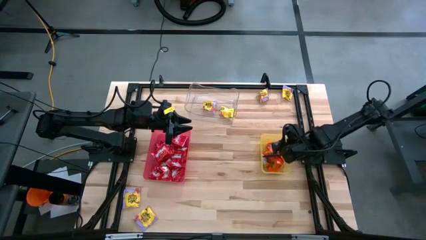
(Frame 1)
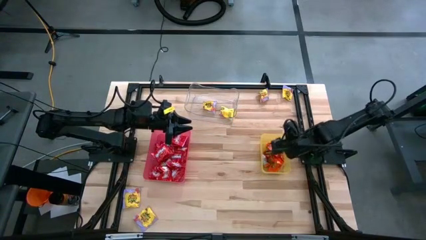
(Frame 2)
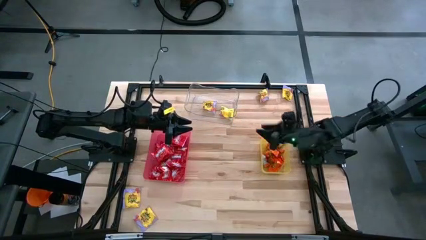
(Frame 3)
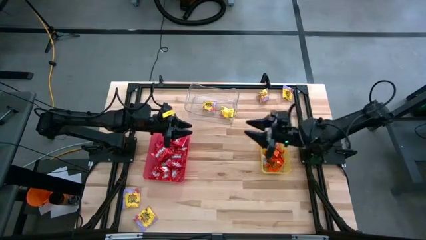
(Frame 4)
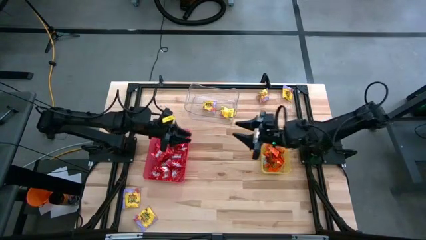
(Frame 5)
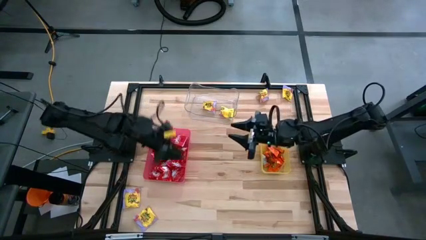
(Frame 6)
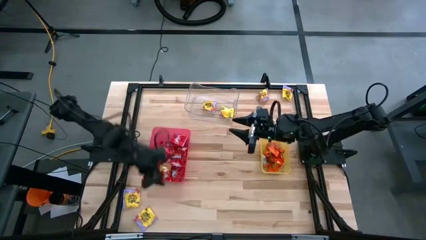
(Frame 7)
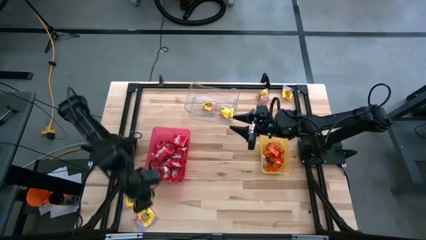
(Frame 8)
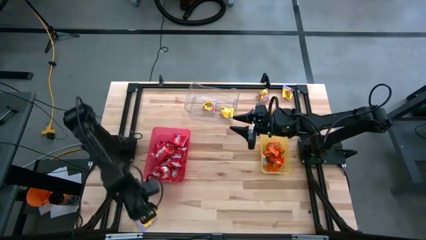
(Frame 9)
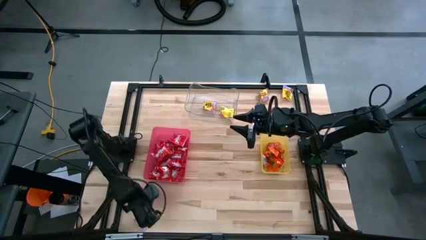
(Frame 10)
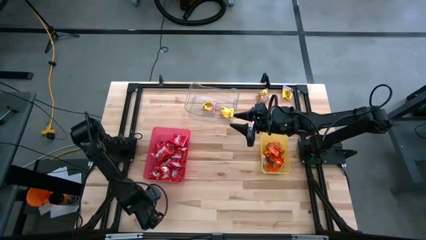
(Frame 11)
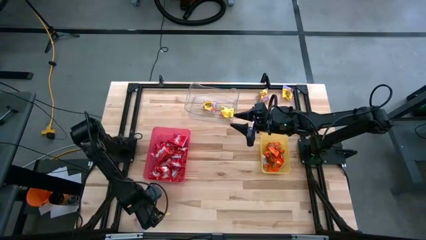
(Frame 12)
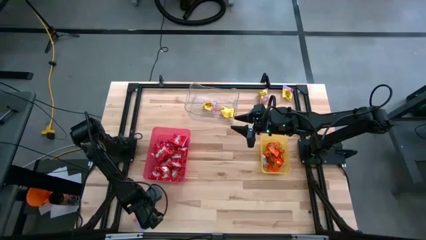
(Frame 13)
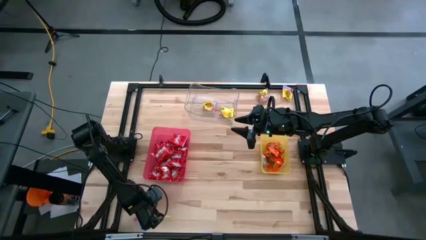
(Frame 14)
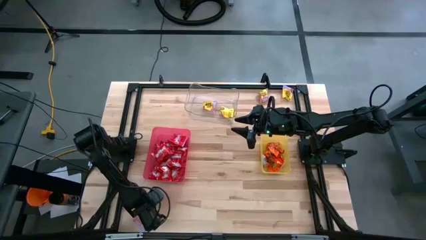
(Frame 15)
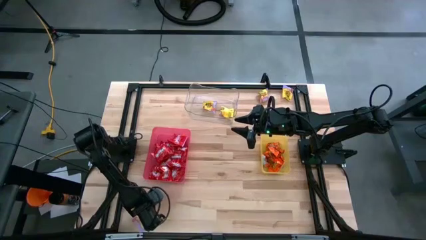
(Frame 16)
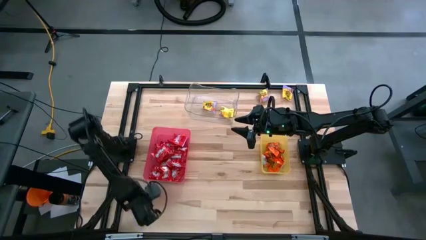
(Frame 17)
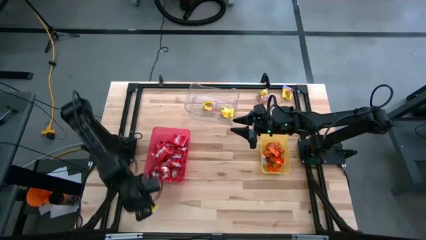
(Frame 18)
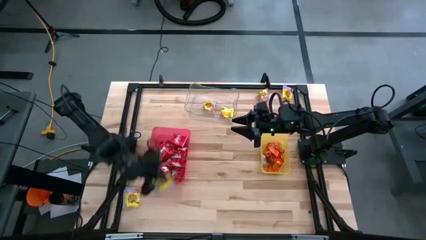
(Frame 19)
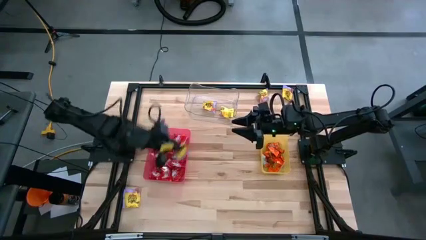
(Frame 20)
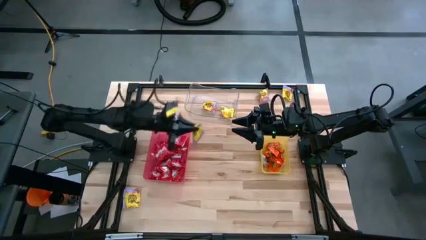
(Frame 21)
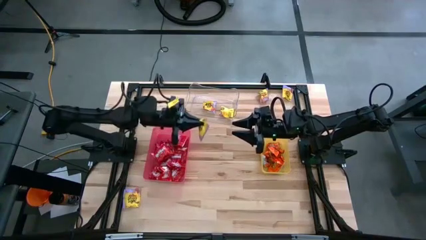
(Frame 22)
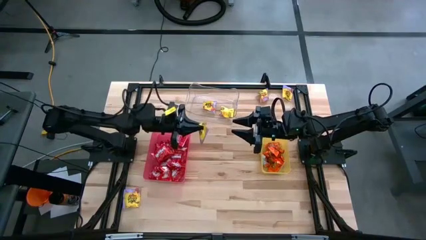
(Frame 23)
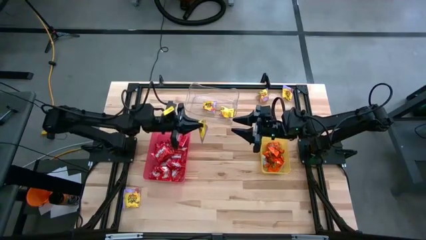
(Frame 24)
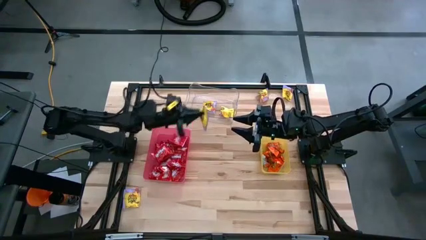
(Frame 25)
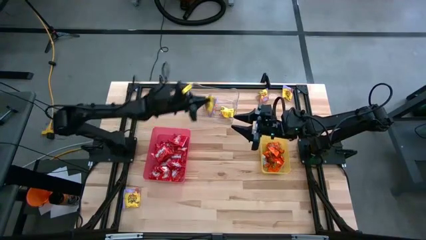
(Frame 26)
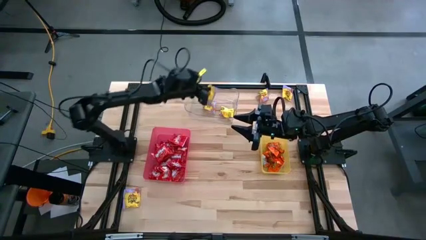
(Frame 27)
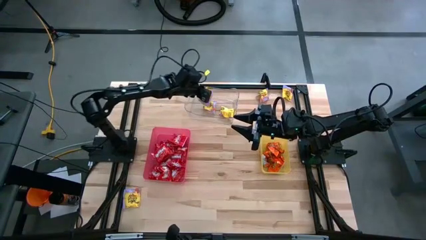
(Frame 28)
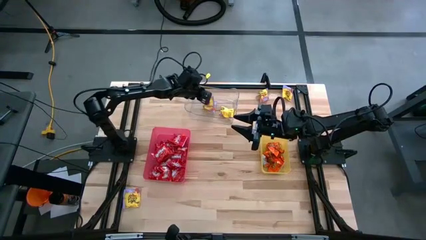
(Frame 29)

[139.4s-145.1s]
Task: Sort candy
Put the yellow candy into the transparent bin

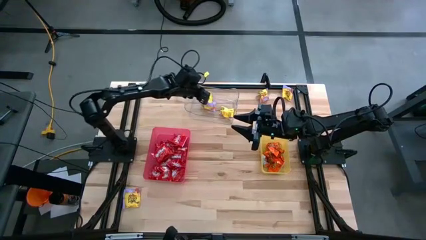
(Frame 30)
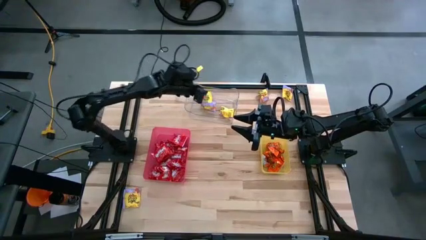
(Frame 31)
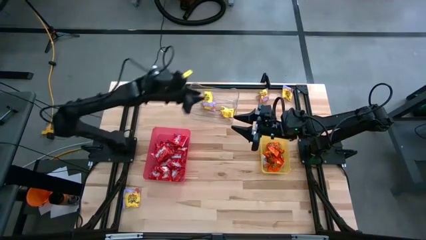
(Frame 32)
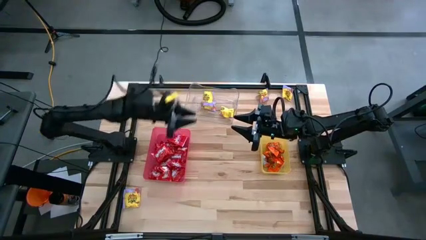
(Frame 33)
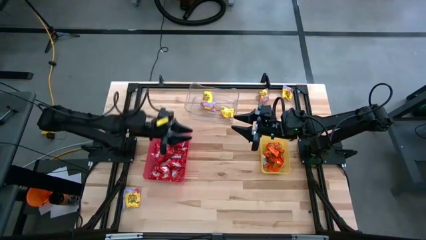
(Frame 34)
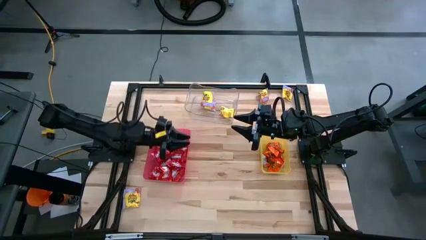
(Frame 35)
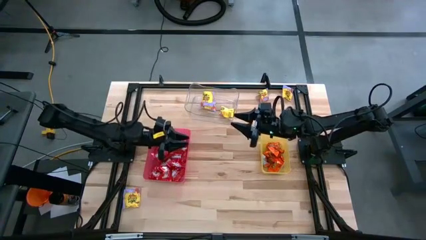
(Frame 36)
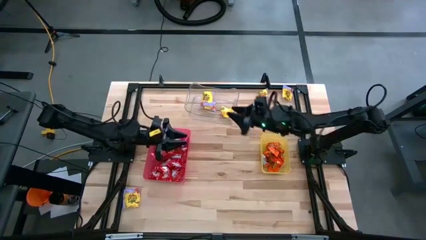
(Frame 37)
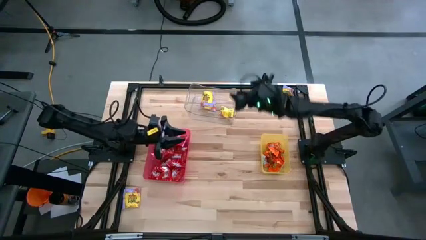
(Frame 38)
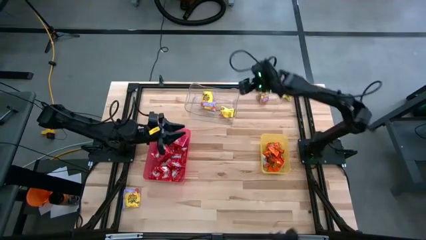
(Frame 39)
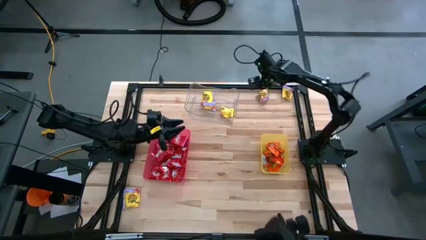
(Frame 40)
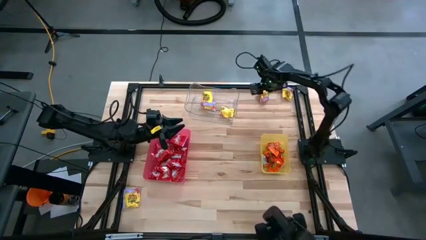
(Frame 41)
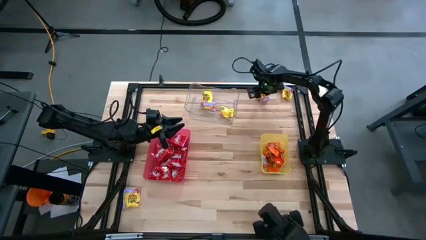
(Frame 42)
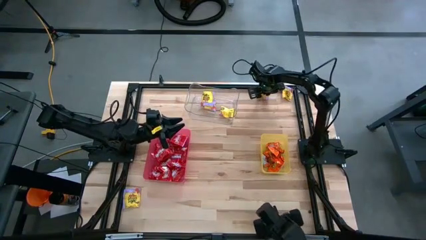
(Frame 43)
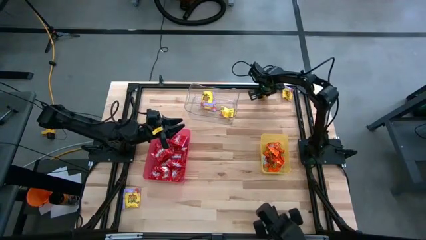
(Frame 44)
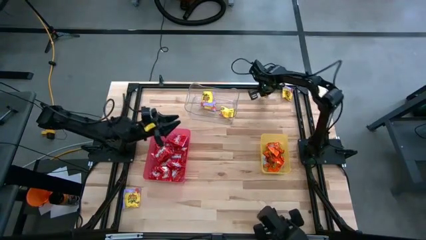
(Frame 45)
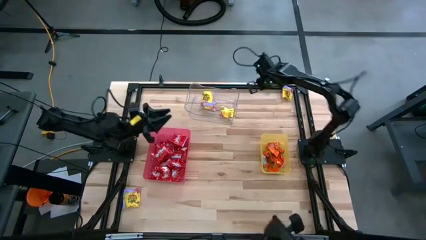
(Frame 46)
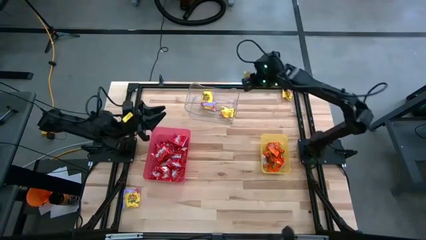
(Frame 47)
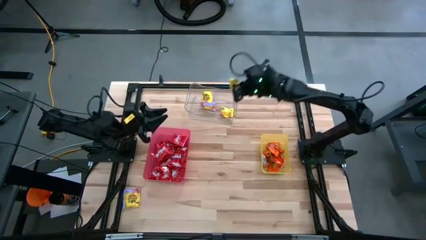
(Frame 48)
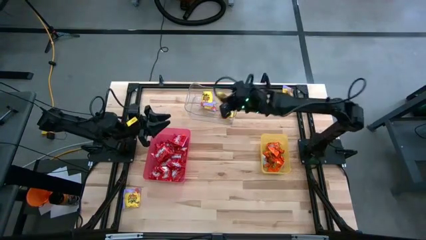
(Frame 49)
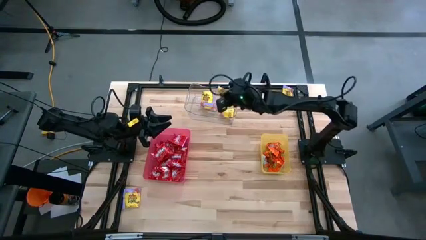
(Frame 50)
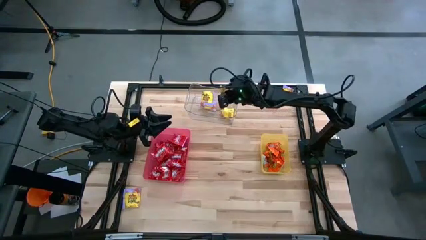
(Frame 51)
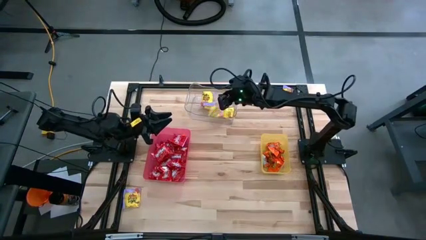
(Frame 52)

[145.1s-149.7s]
Put the yellow candy into the transparent bin

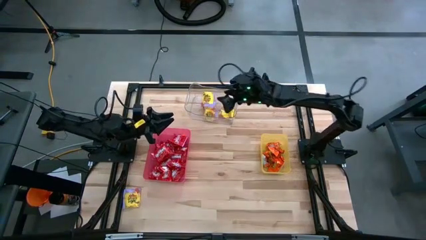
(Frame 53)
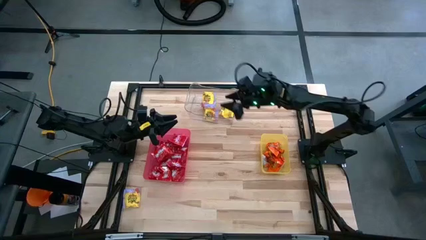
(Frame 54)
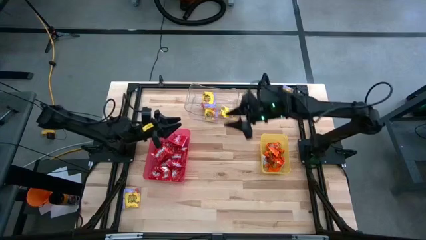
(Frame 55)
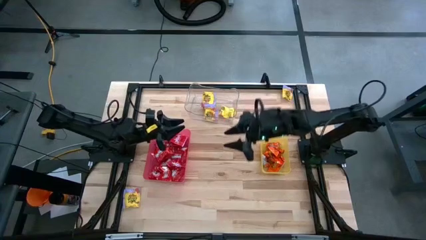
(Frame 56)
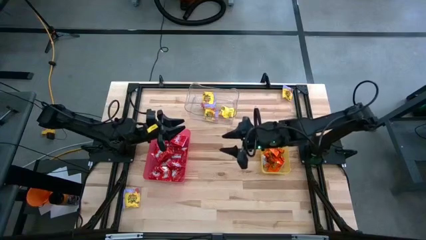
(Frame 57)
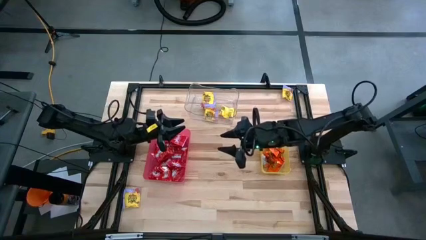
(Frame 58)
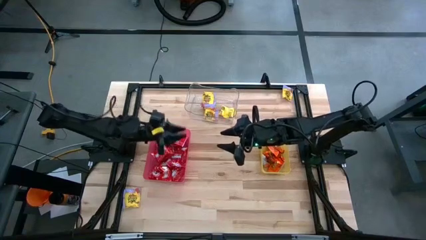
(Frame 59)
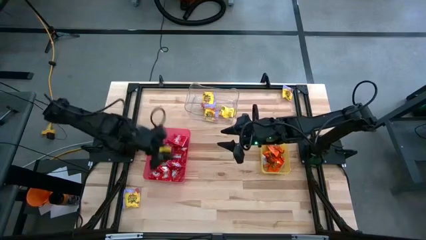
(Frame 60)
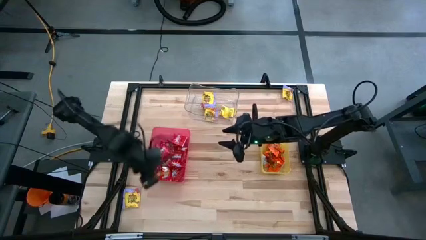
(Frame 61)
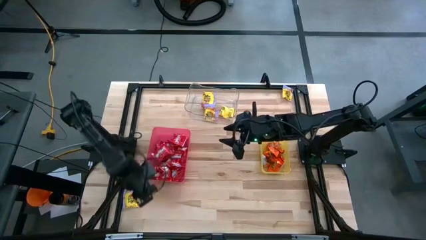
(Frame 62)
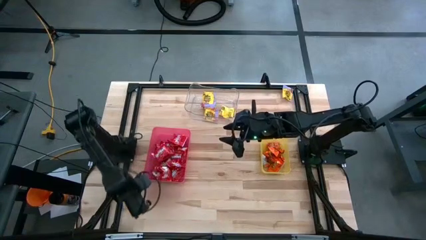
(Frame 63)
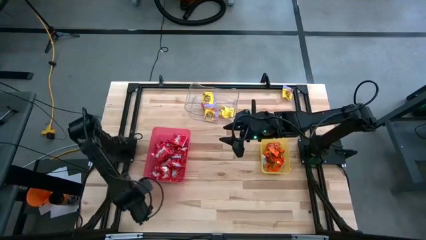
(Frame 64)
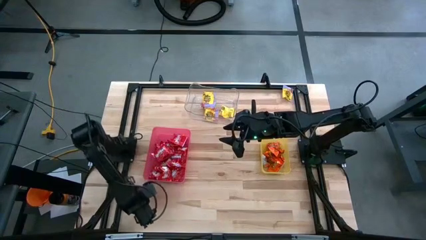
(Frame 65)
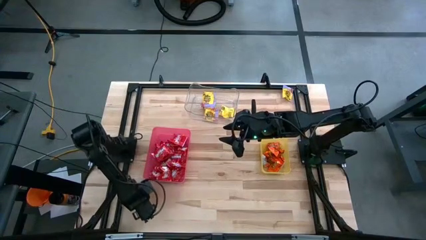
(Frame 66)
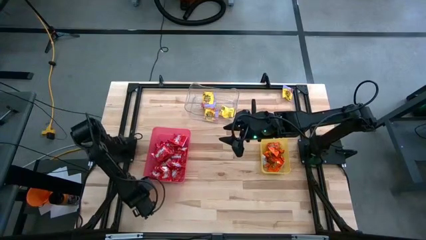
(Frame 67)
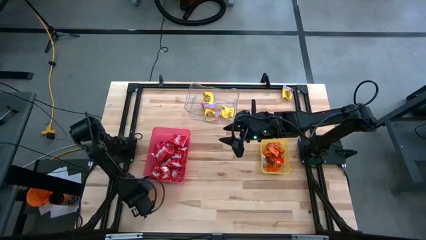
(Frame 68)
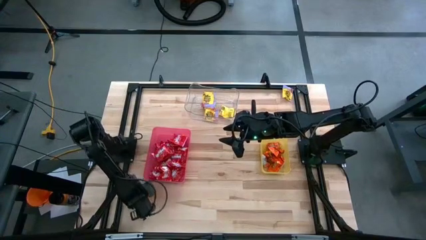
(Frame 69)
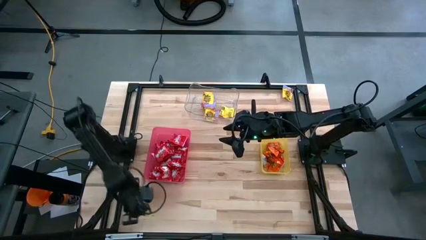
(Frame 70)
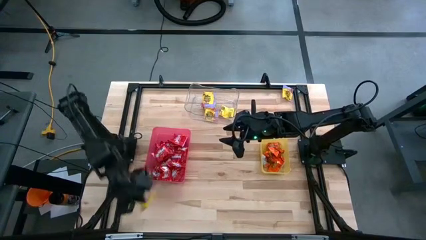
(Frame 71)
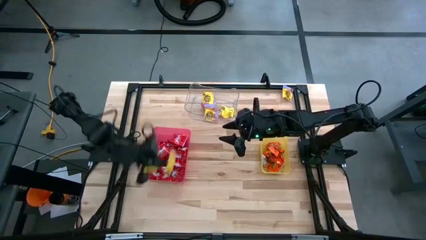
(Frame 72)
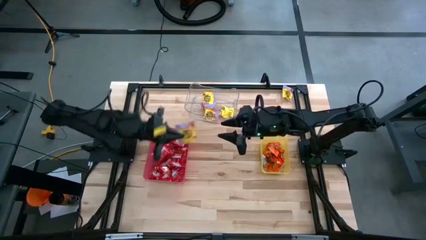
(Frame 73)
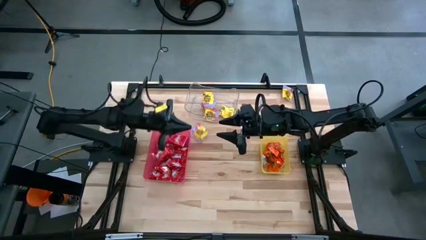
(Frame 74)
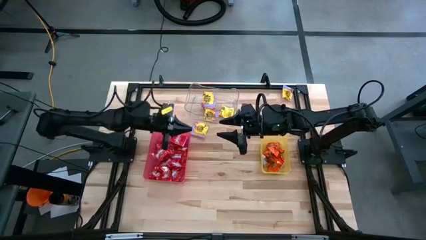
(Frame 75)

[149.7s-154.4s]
Put the yellow candy into the transparent bin

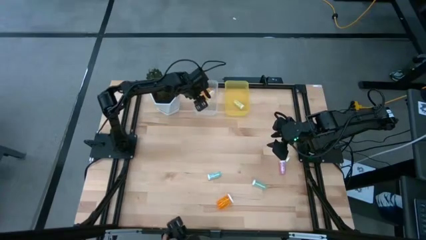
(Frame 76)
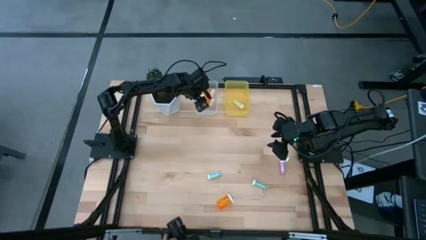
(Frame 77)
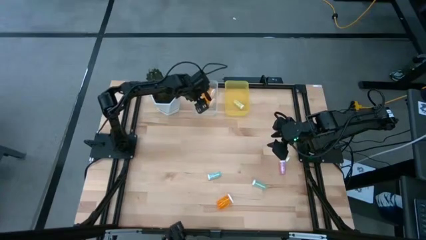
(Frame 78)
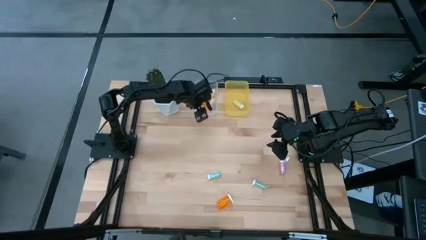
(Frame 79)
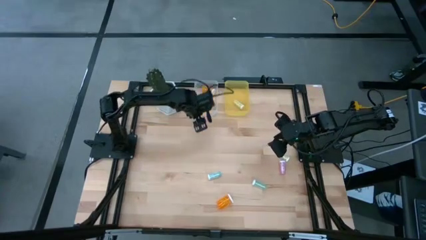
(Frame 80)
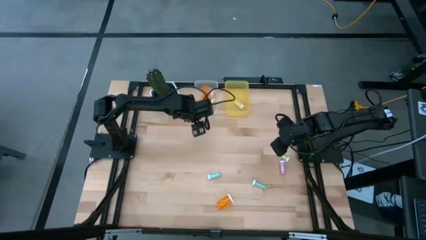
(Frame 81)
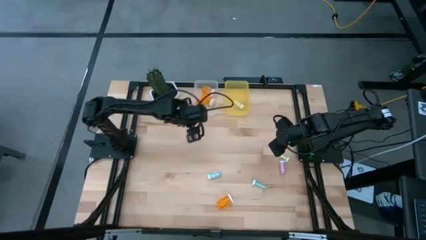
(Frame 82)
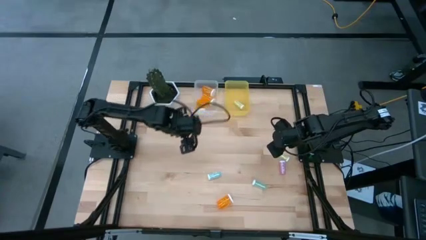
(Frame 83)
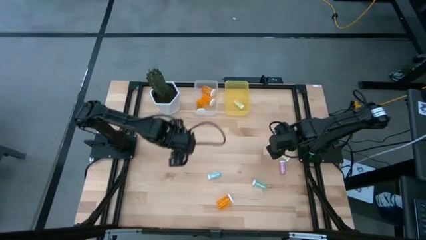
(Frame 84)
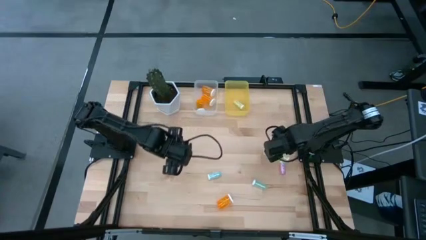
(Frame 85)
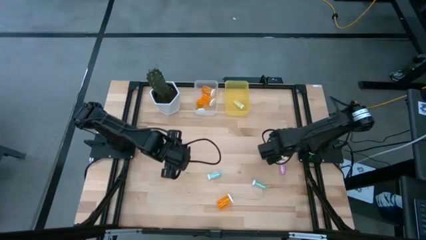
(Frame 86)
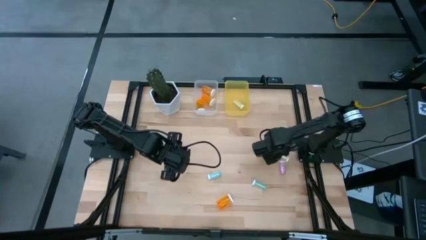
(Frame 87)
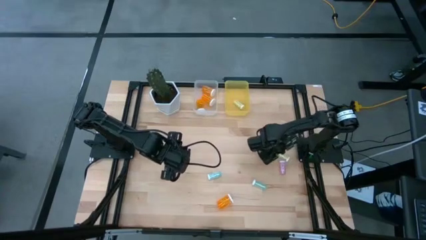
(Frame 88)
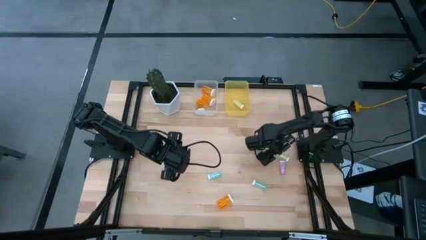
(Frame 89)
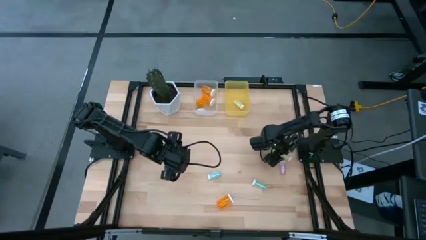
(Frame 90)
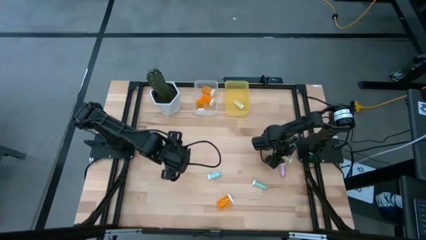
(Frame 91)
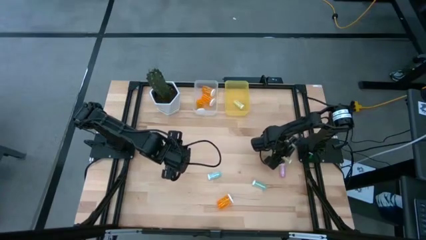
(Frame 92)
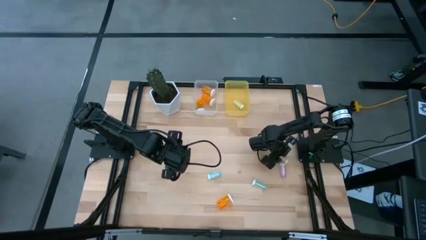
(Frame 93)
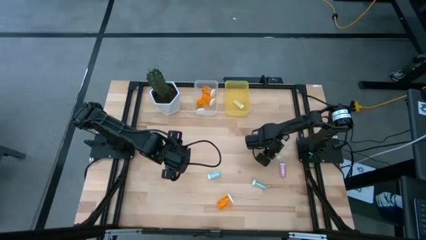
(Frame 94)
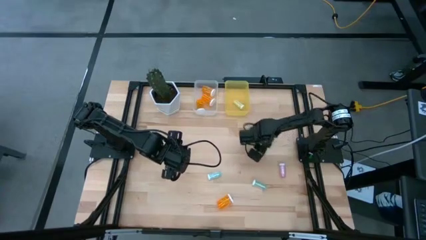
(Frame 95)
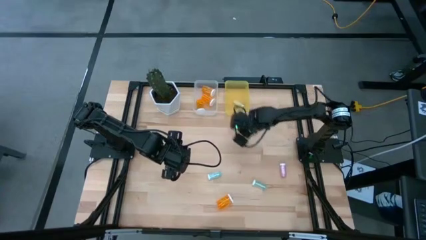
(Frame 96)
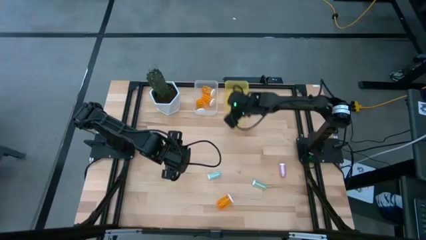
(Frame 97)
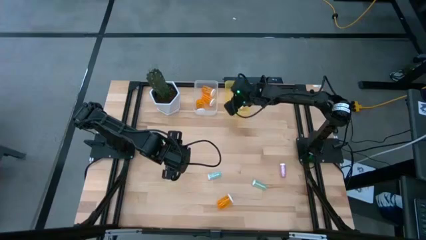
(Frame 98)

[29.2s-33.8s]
Task: Pick and place medicine bottles into bin by pill shape (circle, oval)
Put the yellow pill bottle into the yellow bin
